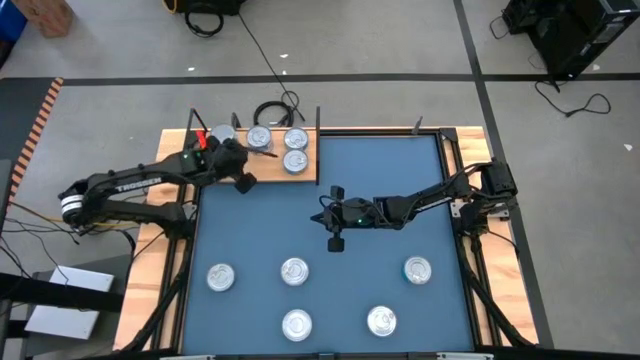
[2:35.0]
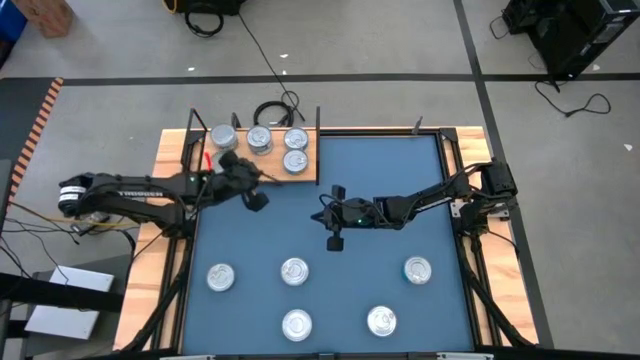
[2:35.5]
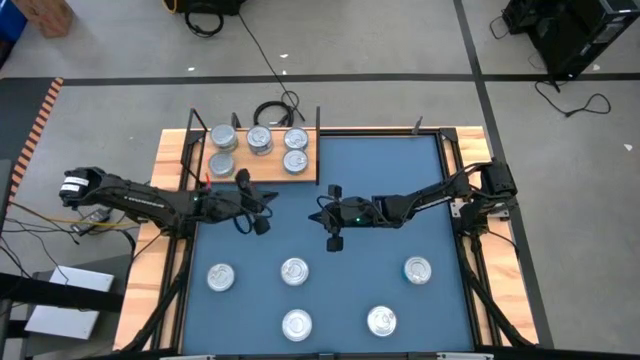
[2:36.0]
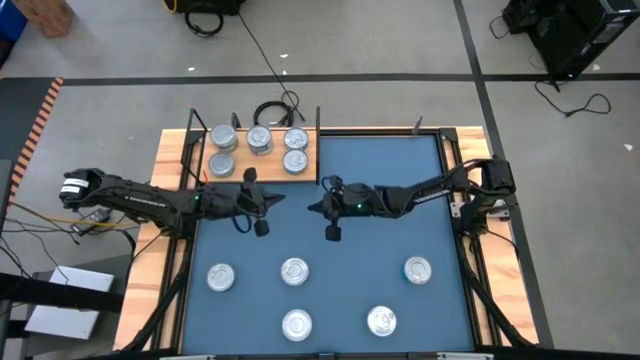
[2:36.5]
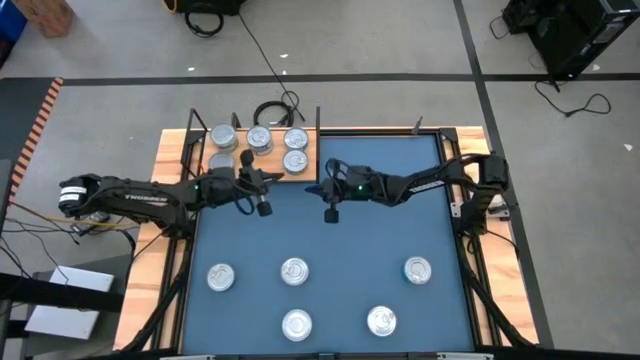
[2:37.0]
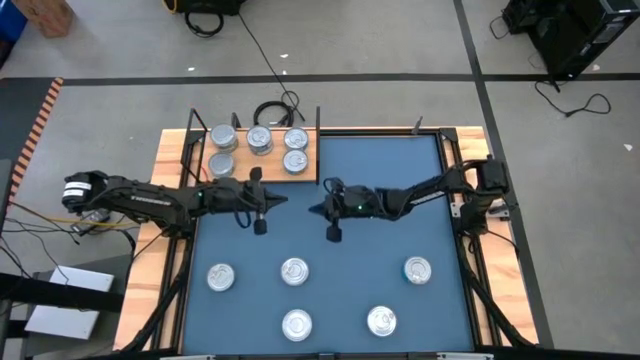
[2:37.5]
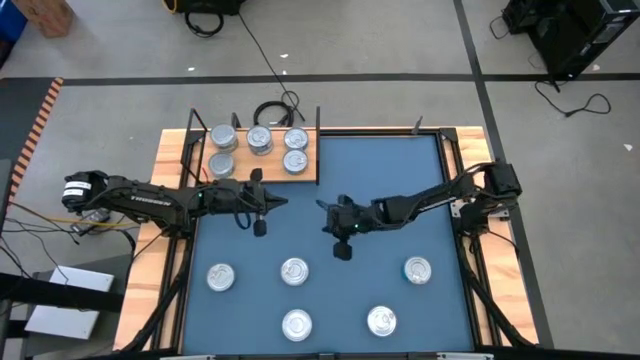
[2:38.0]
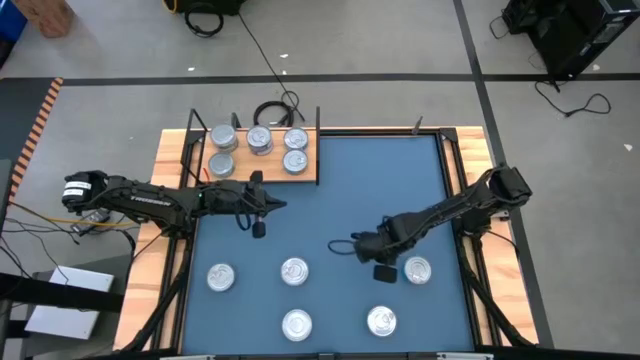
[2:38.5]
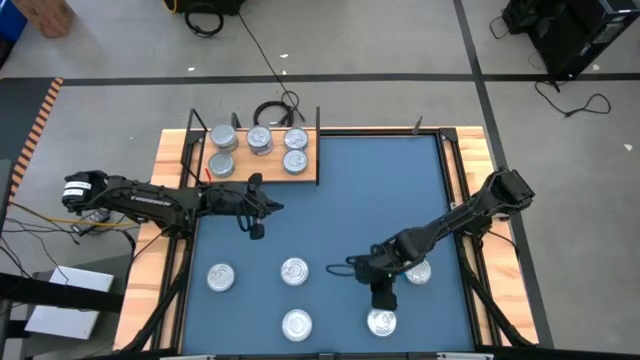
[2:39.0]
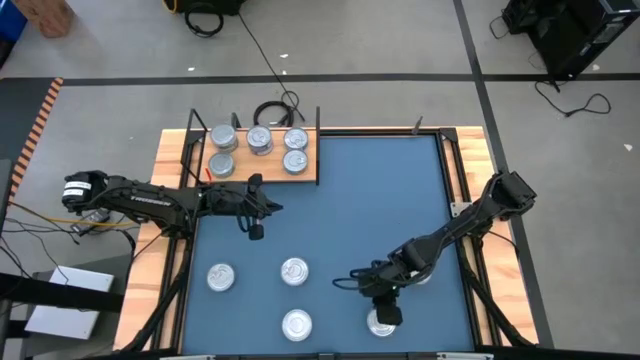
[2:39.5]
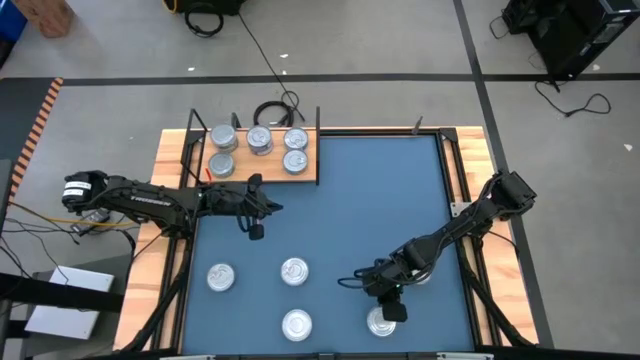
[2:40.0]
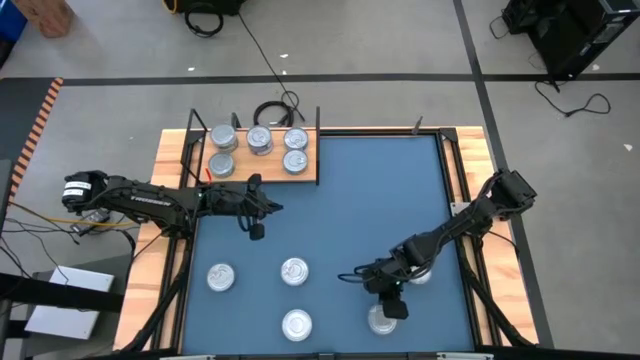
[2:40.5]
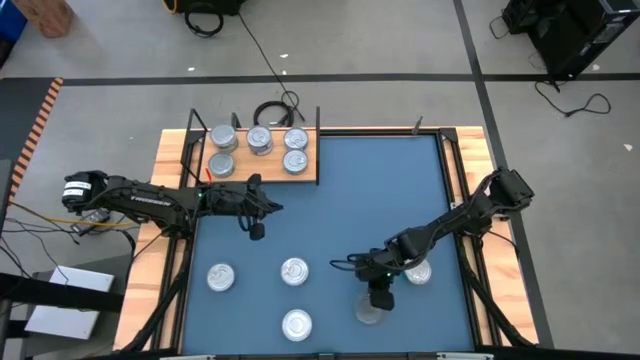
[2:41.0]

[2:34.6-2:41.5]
Task: Stack canned seafood by type on shelf
Put the blue tuna can on the shelf aligned with the other blue tuna can

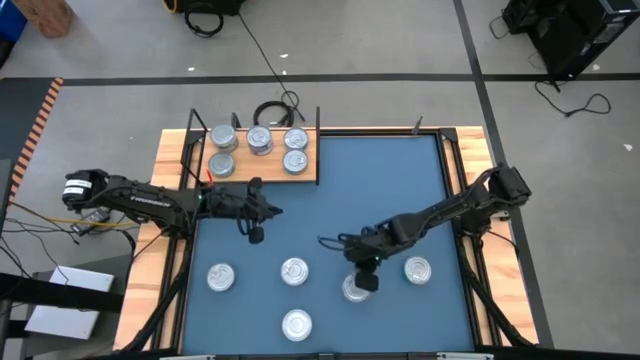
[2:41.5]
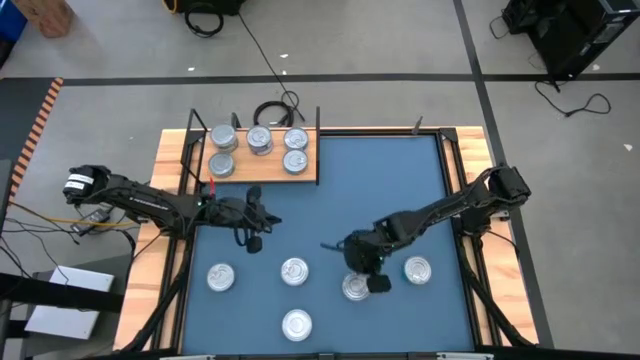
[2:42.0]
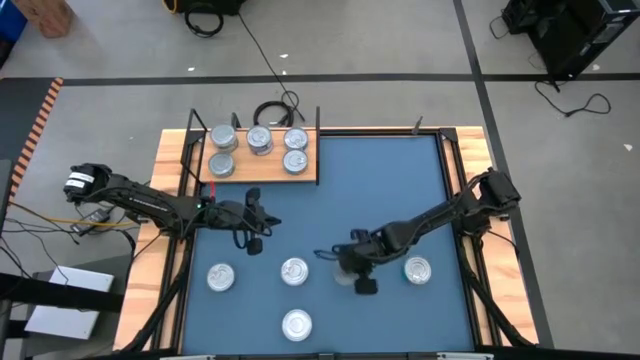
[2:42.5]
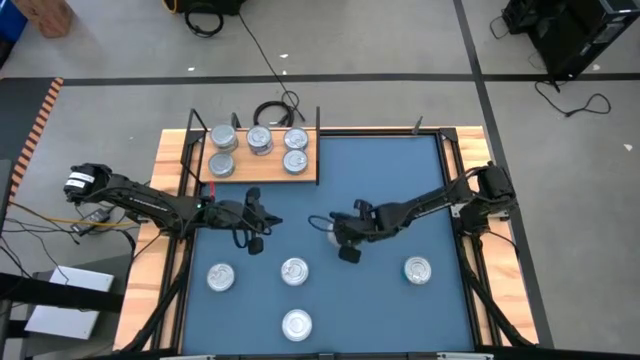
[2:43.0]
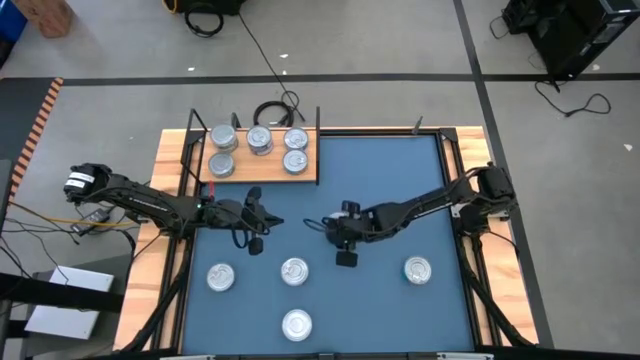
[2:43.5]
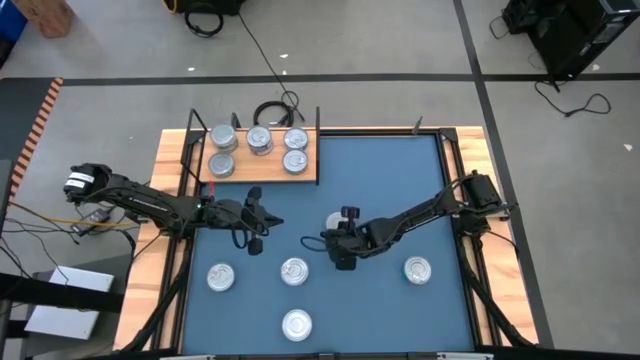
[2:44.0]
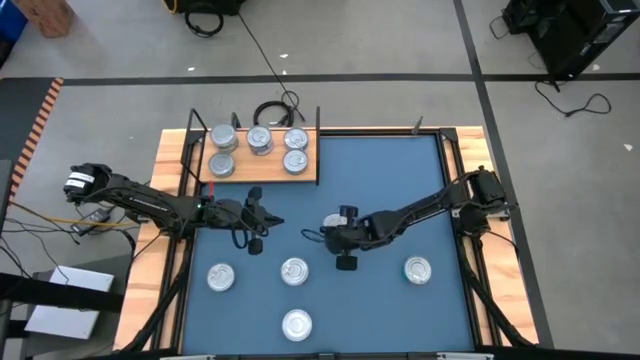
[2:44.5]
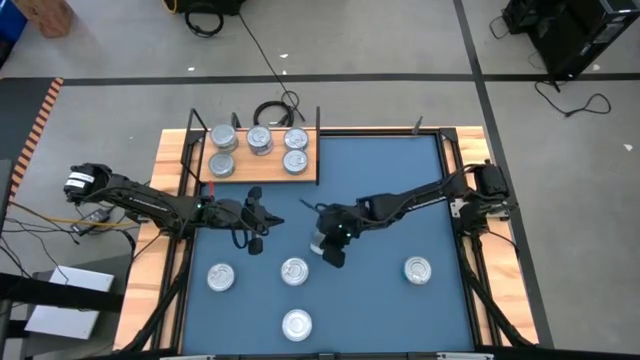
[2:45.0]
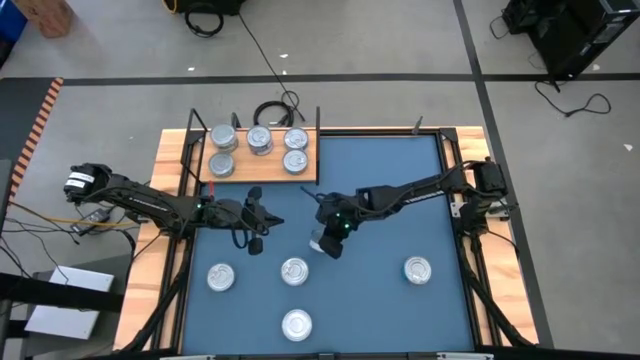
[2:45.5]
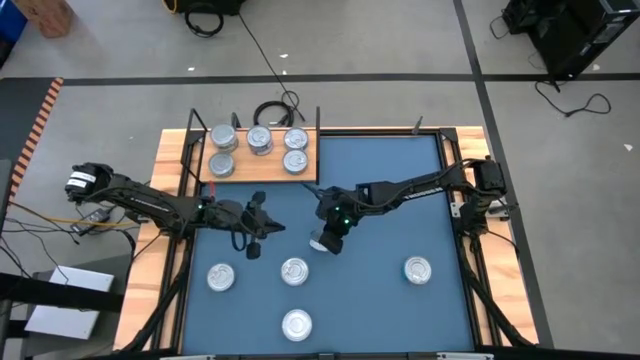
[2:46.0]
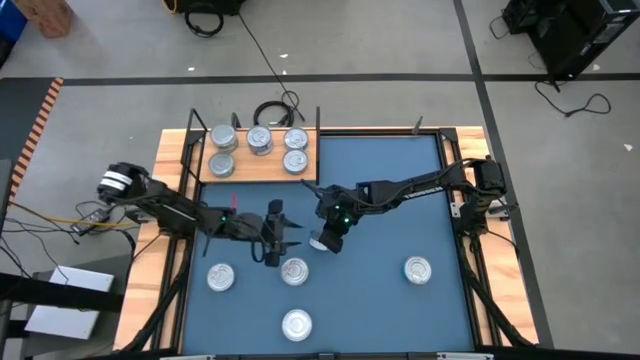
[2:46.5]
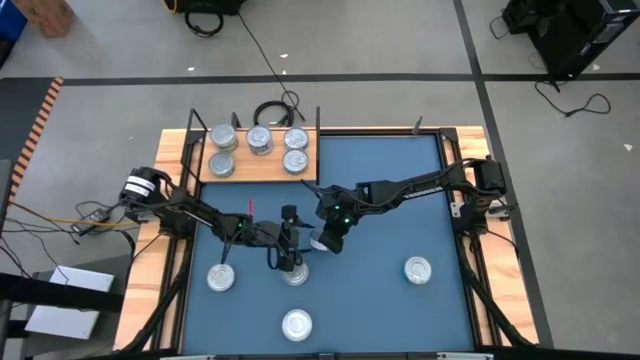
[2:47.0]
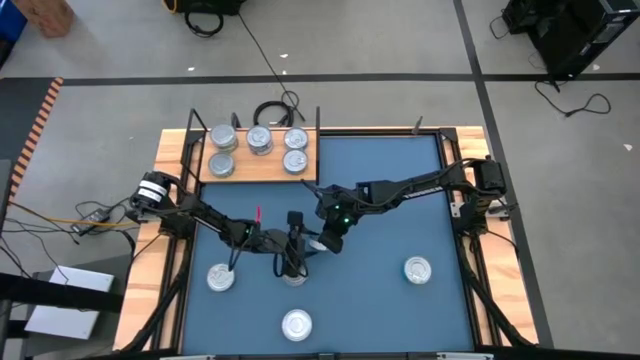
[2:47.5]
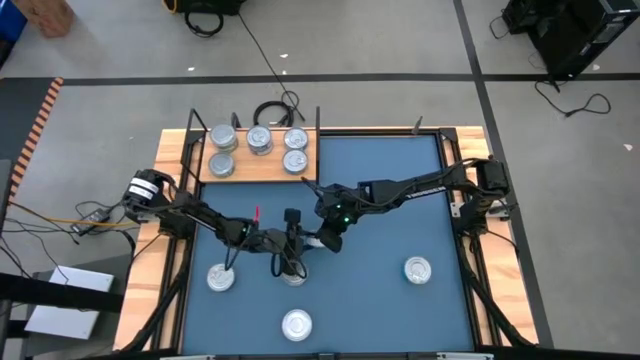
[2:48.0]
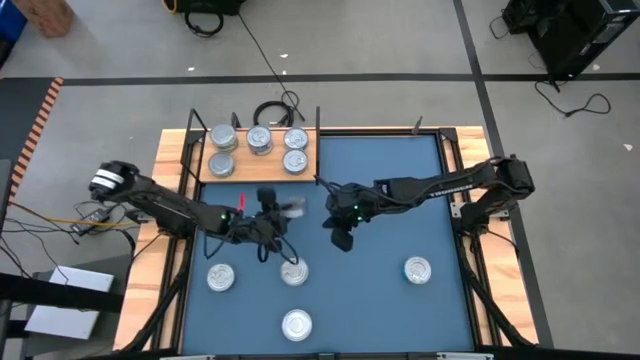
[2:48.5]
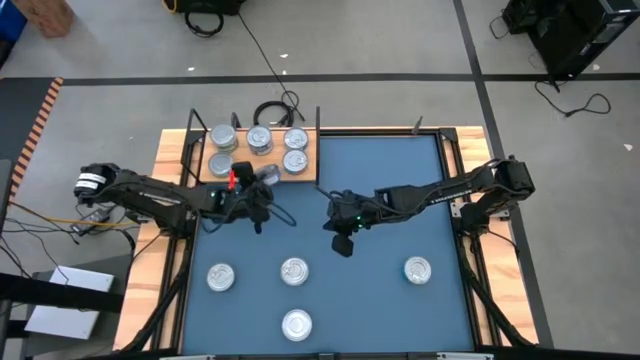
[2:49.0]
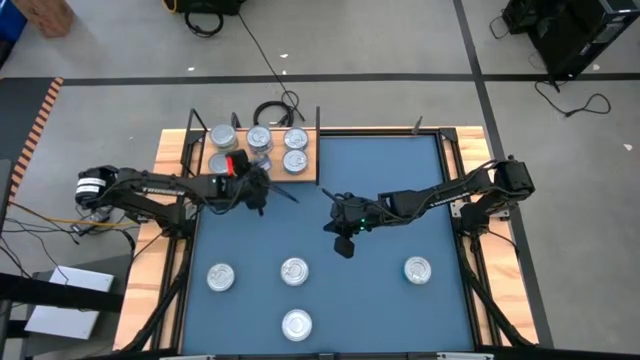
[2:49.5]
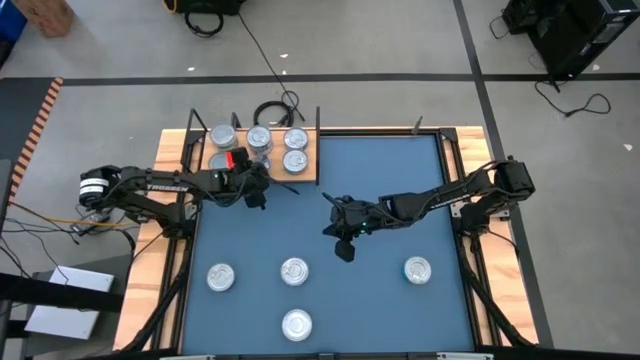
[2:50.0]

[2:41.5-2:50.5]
Put the blue tuna can on the shelf aligned with the other blue tuna can
